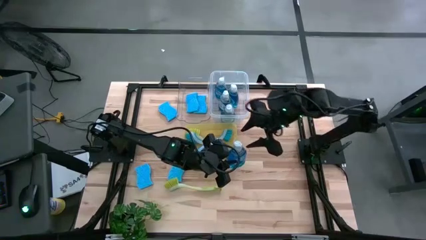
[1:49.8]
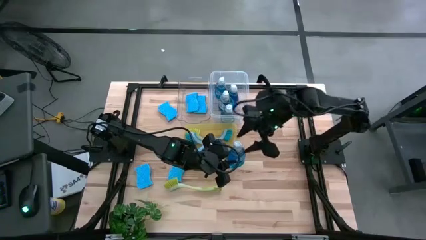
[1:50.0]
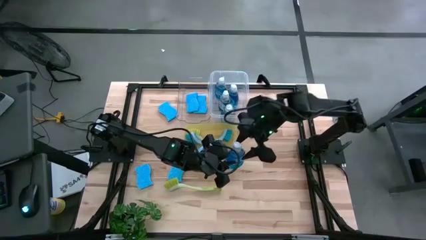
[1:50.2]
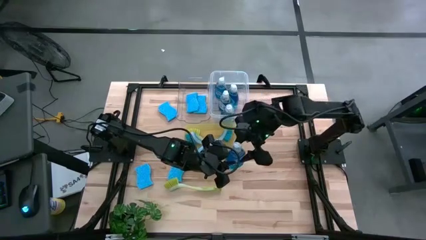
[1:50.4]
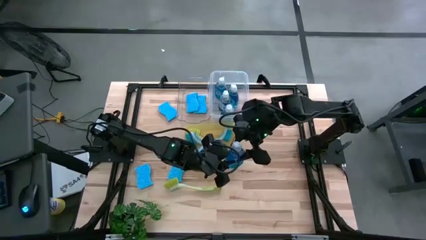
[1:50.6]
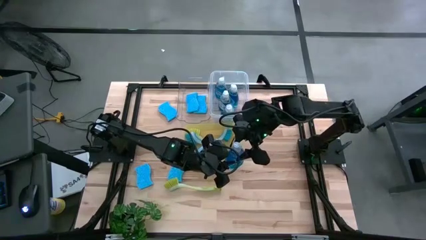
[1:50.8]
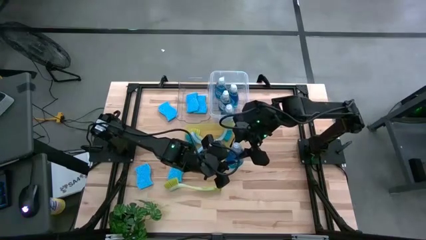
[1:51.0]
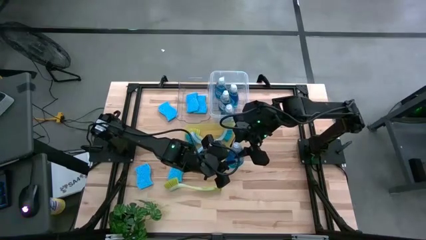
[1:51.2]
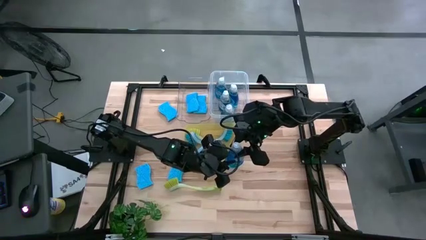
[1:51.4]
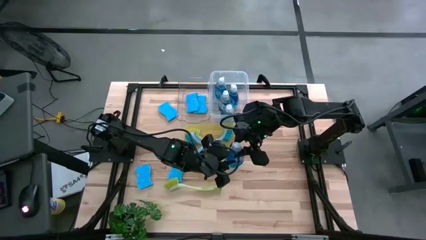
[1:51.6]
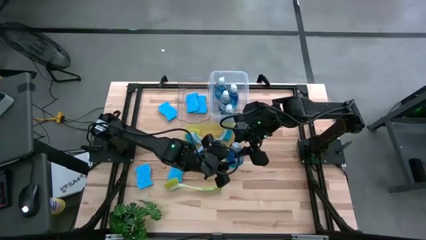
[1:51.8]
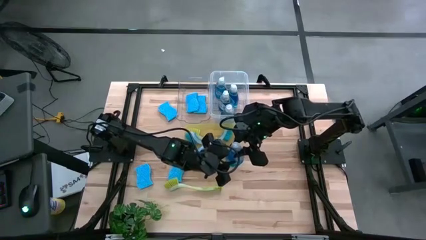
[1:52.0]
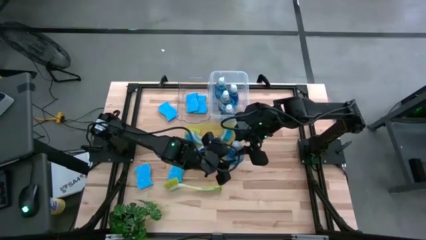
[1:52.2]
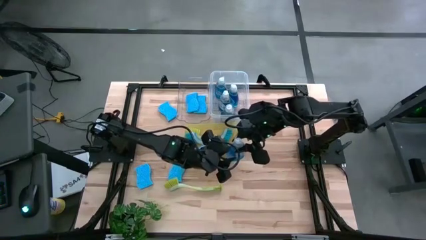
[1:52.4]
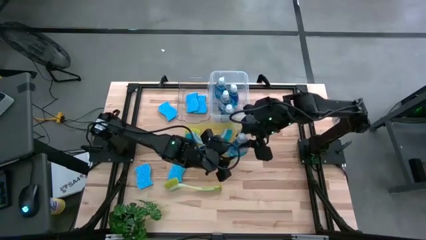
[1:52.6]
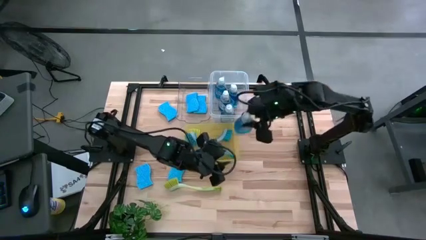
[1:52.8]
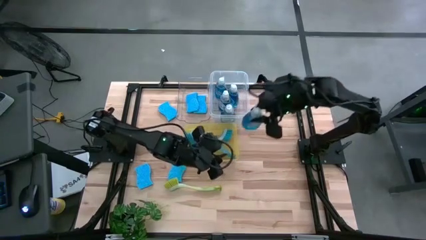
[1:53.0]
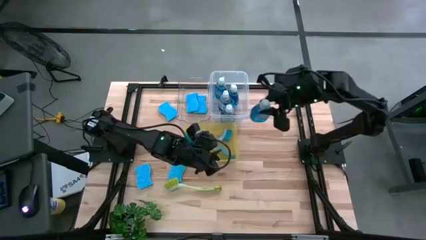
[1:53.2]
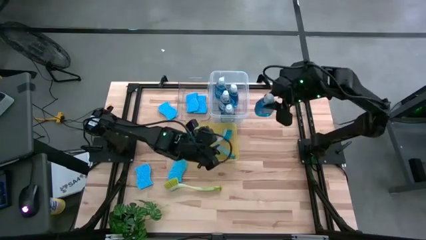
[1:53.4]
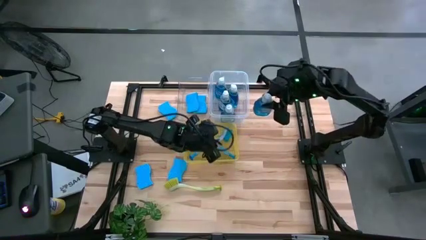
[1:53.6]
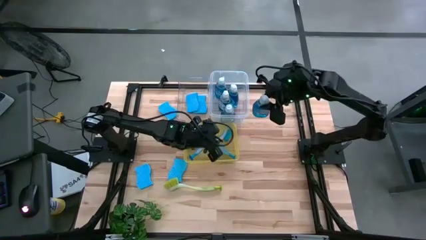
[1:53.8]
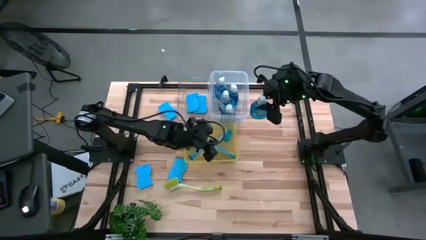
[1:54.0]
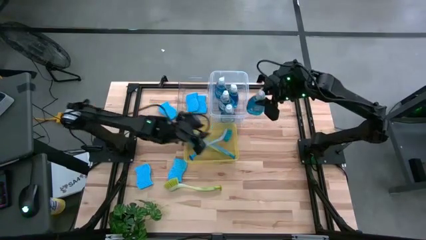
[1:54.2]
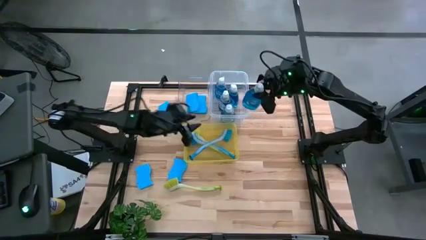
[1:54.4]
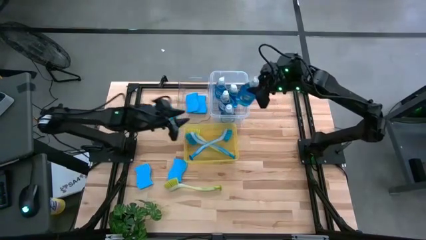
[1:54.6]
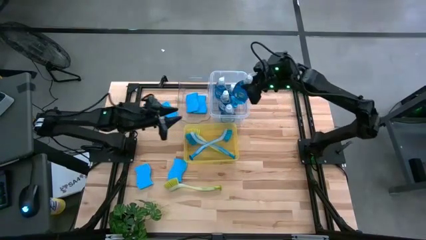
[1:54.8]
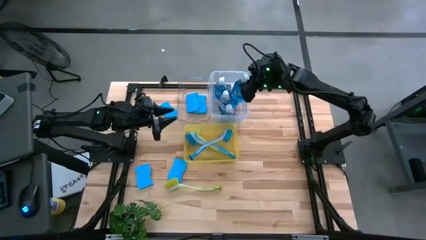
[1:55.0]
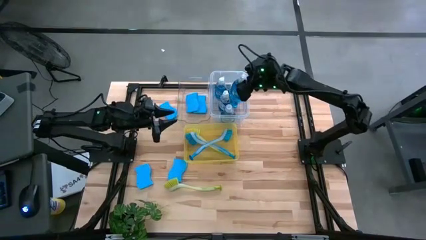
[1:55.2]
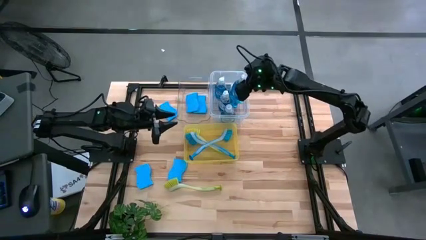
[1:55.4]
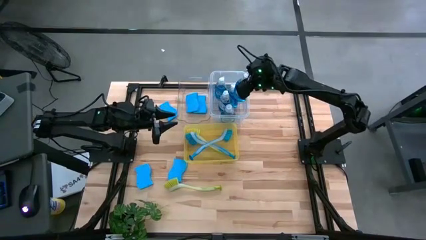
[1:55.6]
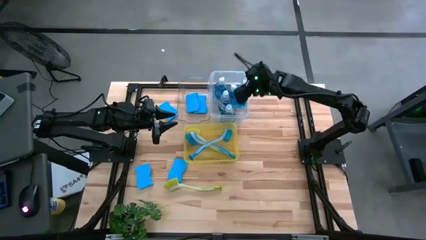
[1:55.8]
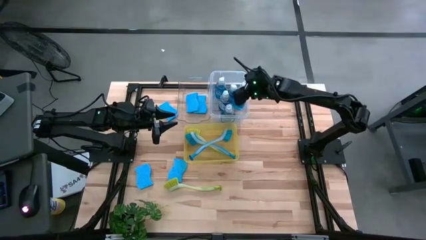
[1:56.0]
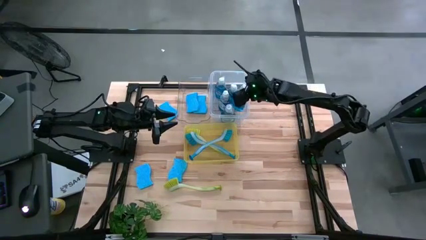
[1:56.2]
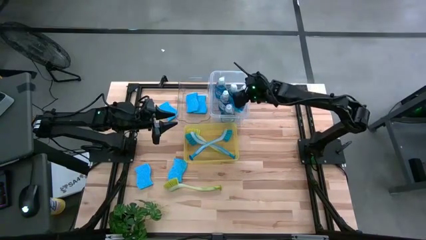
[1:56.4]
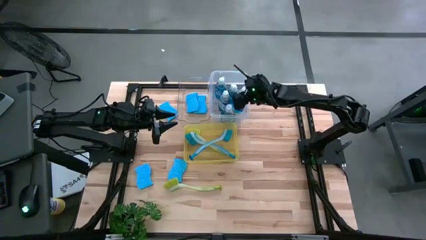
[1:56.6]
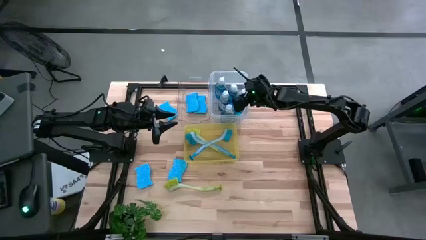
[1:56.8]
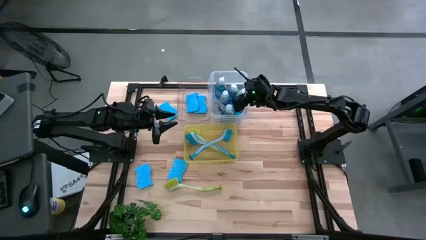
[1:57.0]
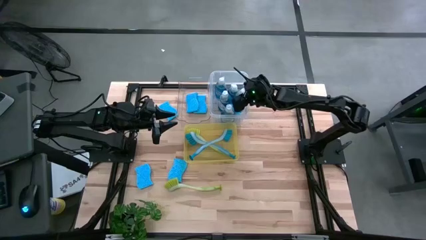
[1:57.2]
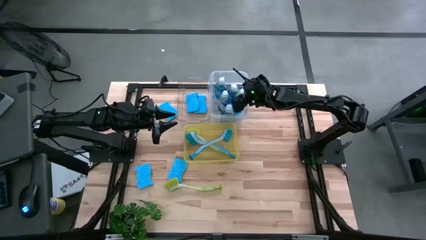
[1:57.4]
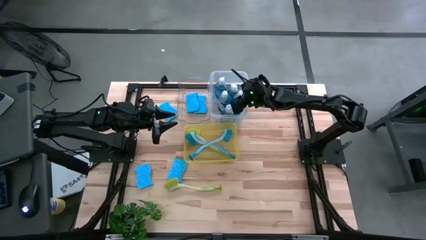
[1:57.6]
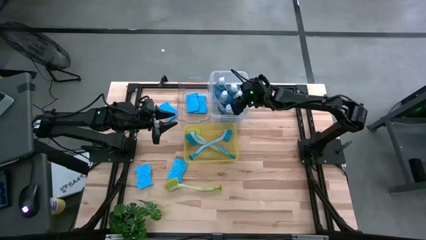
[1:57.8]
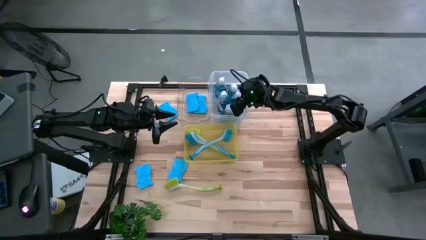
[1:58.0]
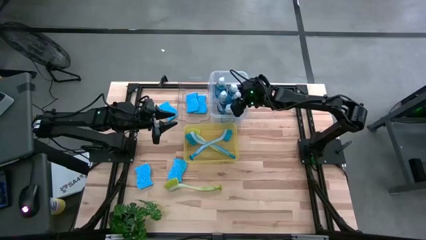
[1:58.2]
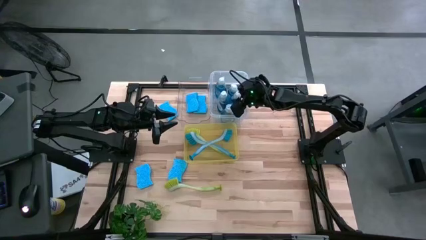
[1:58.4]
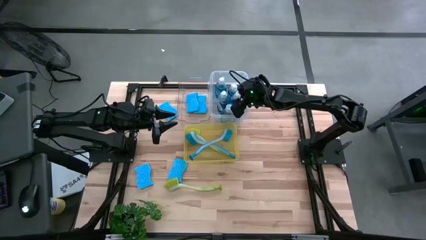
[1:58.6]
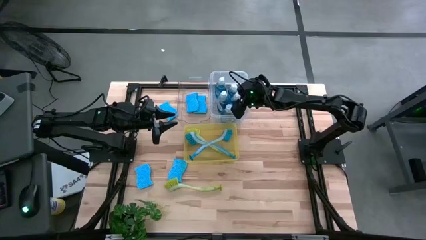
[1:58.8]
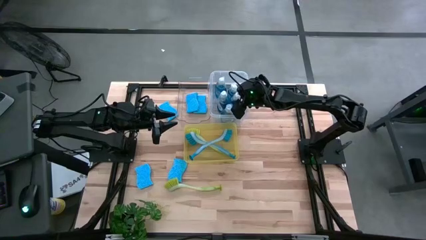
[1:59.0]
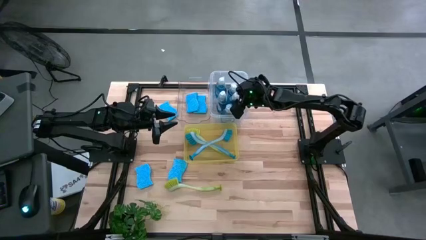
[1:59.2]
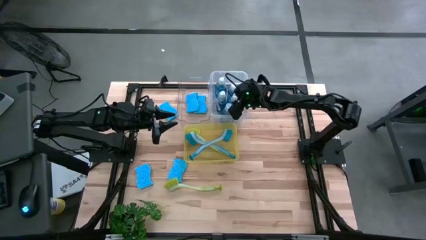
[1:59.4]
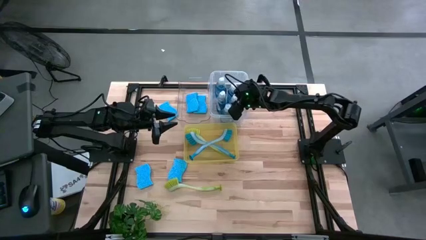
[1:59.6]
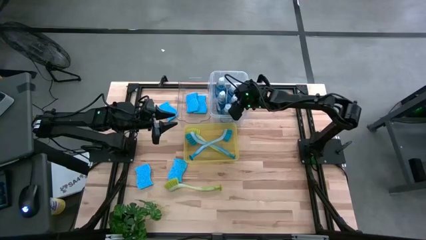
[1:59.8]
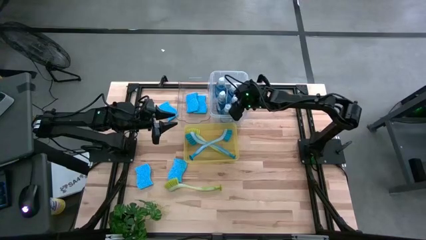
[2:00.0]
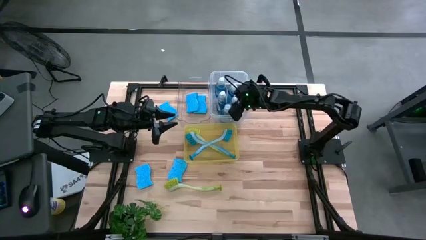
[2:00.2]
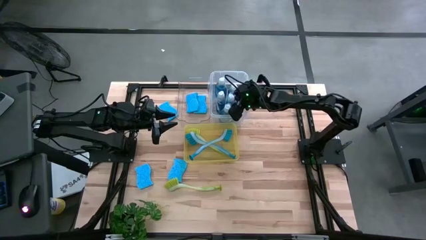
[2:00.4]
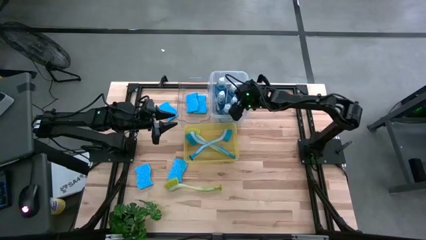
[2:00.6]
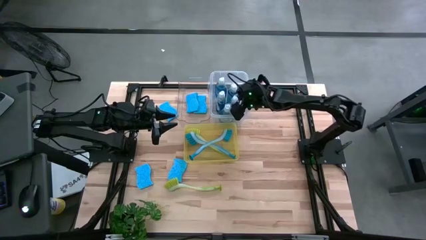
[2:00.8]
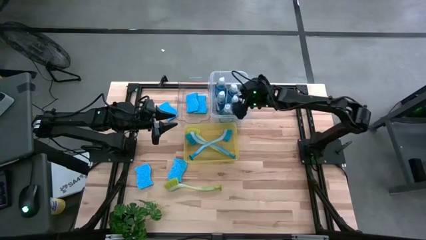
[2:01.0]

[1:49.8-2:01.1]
Task: Pick & Place Kitchen Sink Supplies
Put the blue dishwasher liquid into the white bin
